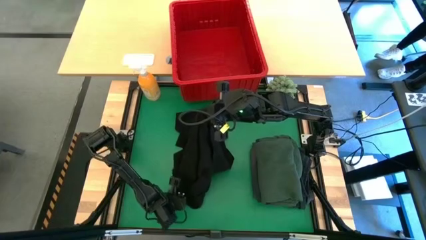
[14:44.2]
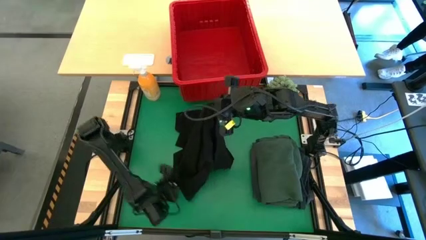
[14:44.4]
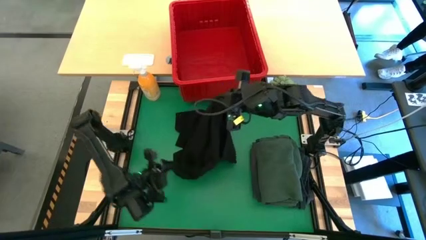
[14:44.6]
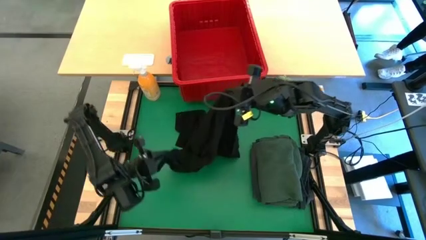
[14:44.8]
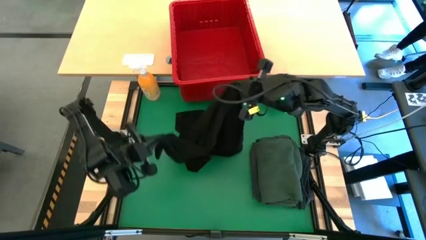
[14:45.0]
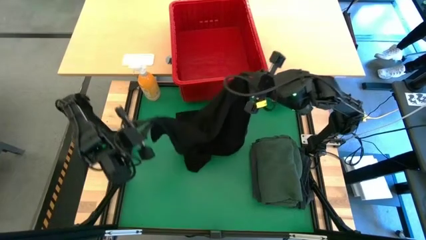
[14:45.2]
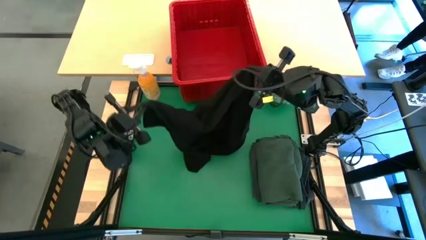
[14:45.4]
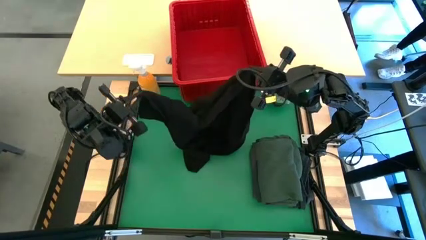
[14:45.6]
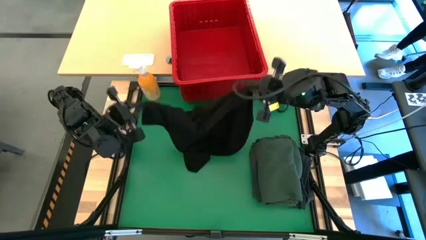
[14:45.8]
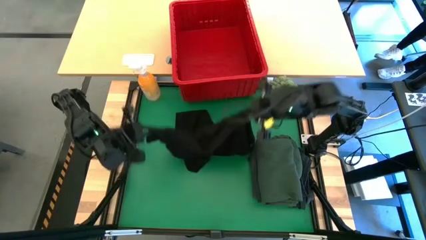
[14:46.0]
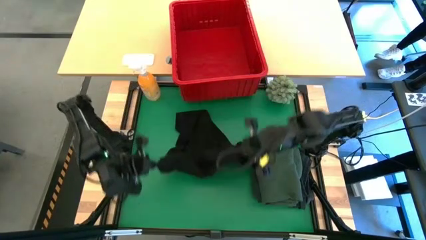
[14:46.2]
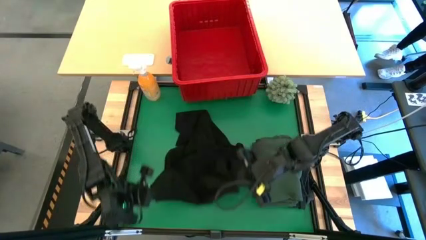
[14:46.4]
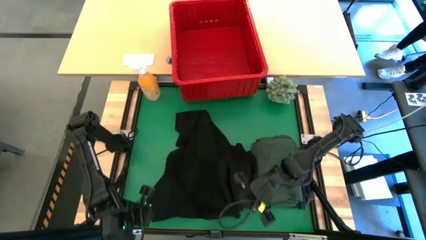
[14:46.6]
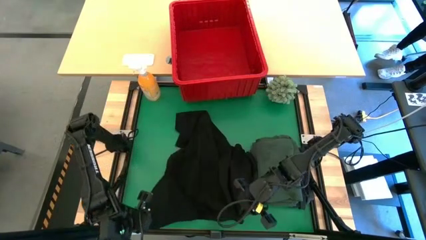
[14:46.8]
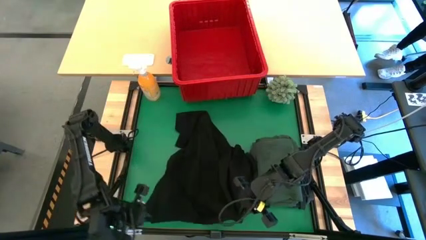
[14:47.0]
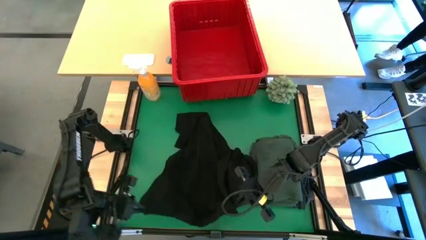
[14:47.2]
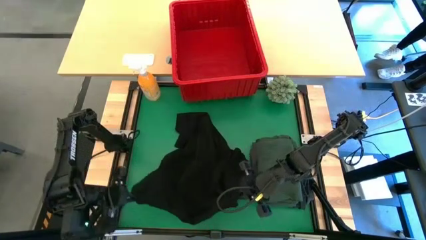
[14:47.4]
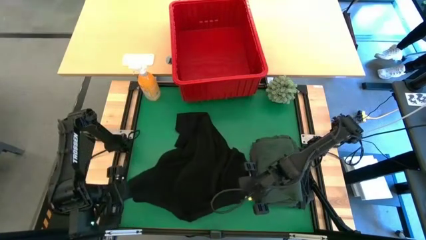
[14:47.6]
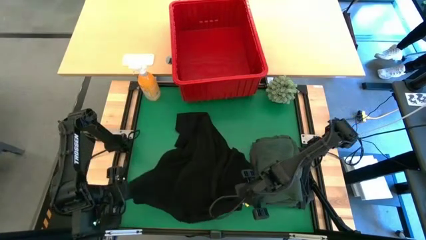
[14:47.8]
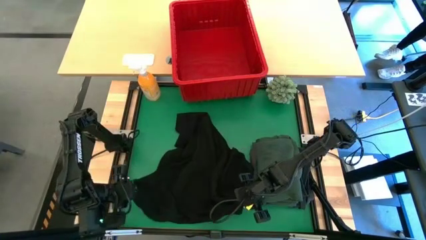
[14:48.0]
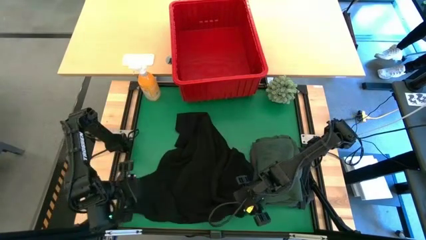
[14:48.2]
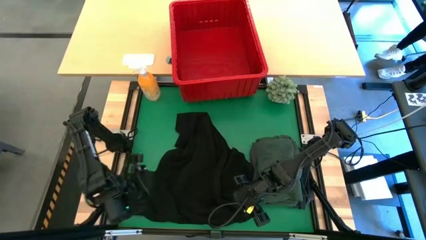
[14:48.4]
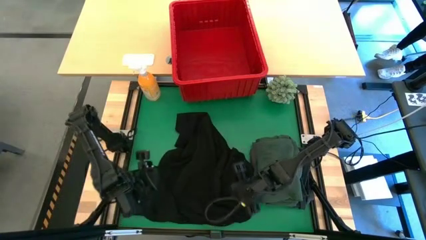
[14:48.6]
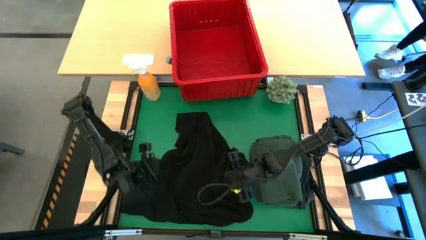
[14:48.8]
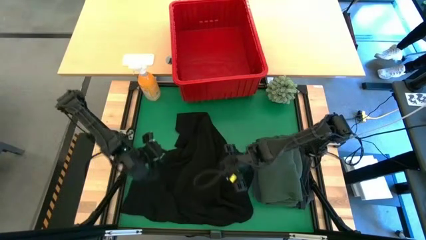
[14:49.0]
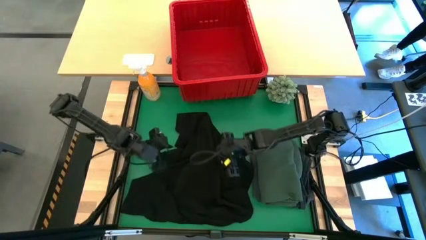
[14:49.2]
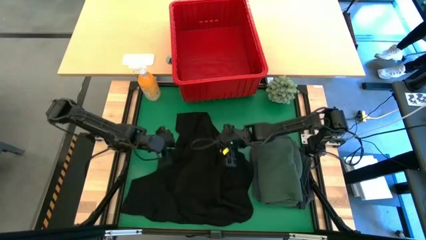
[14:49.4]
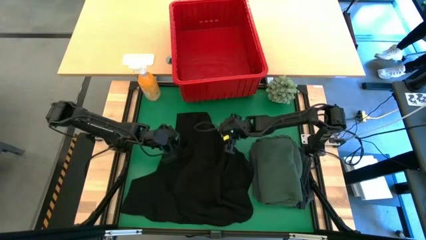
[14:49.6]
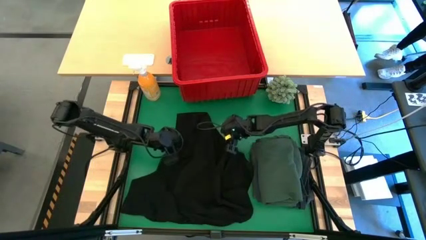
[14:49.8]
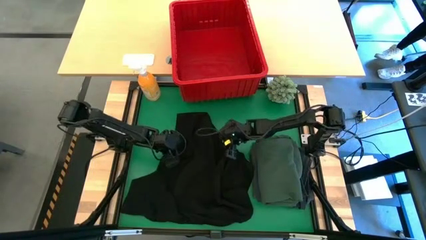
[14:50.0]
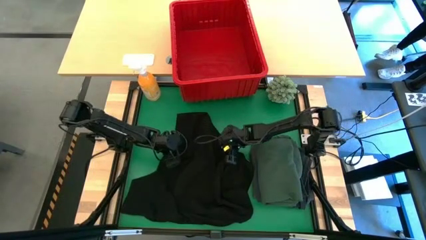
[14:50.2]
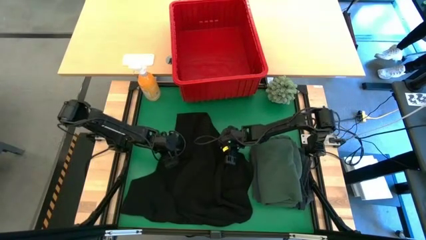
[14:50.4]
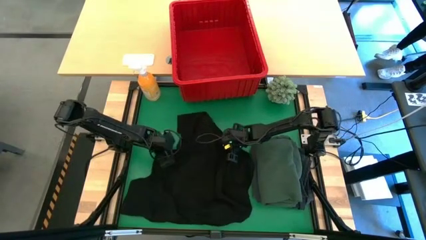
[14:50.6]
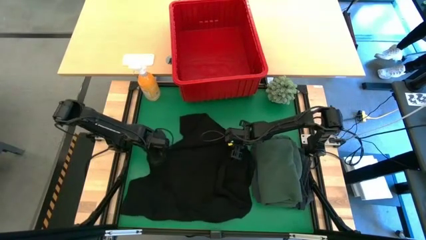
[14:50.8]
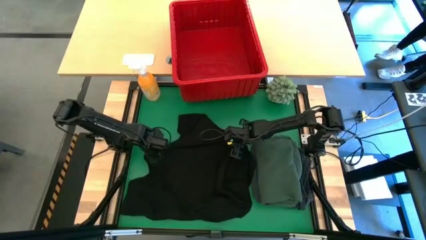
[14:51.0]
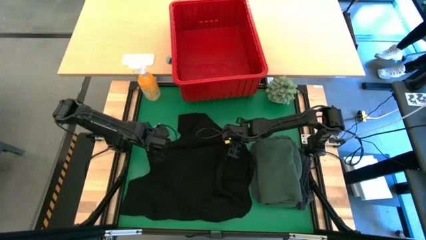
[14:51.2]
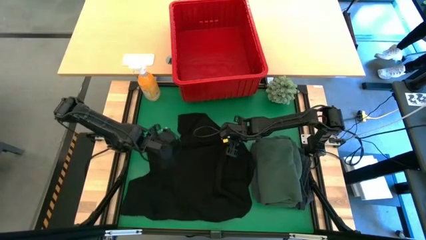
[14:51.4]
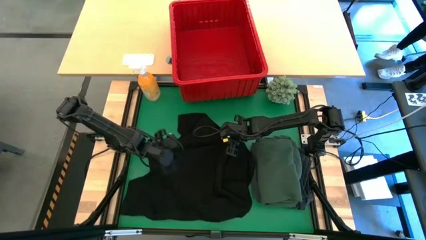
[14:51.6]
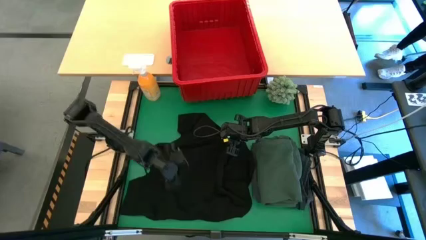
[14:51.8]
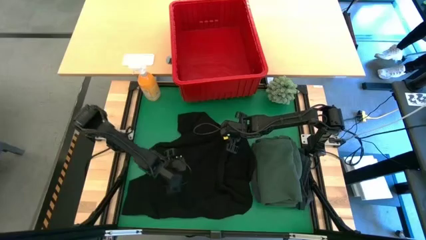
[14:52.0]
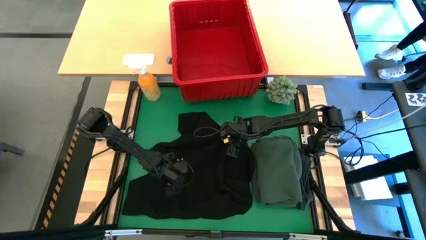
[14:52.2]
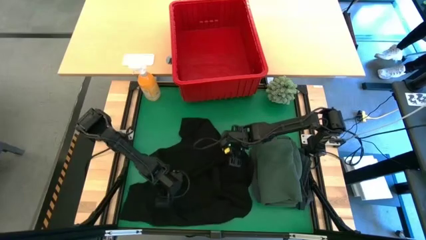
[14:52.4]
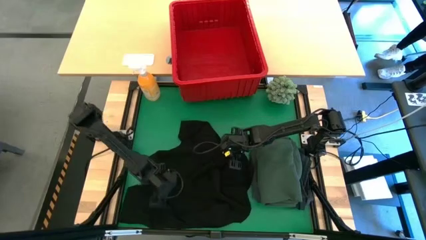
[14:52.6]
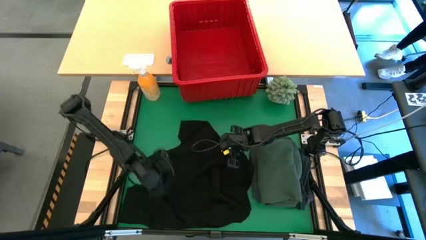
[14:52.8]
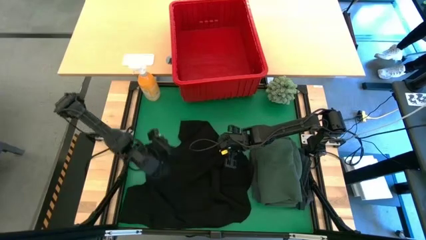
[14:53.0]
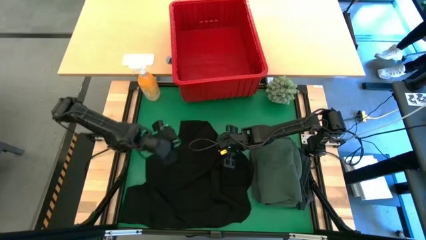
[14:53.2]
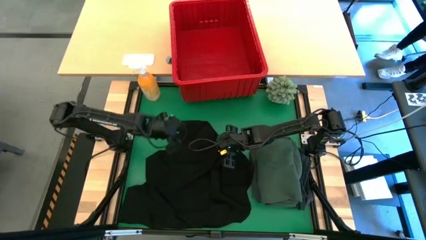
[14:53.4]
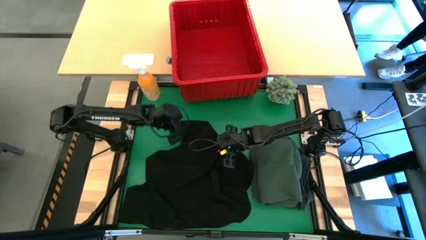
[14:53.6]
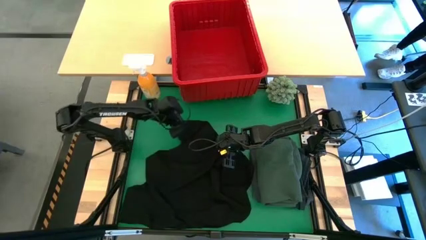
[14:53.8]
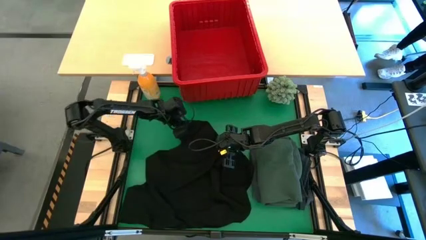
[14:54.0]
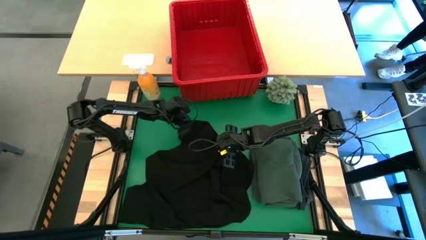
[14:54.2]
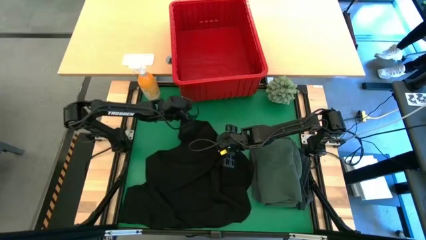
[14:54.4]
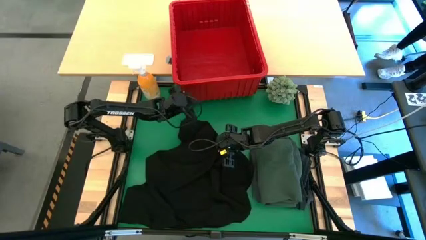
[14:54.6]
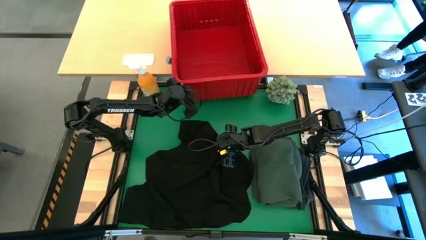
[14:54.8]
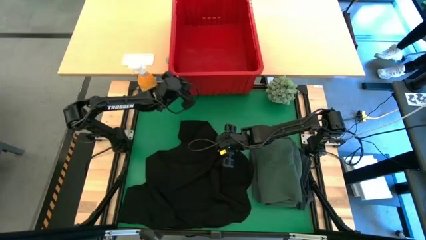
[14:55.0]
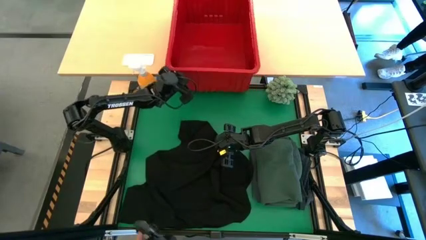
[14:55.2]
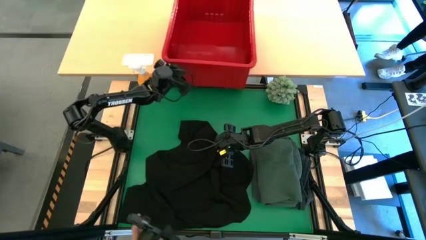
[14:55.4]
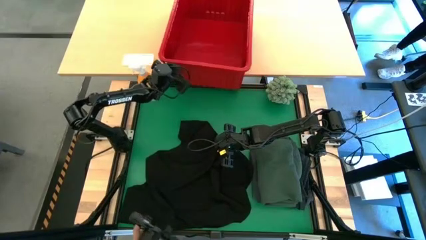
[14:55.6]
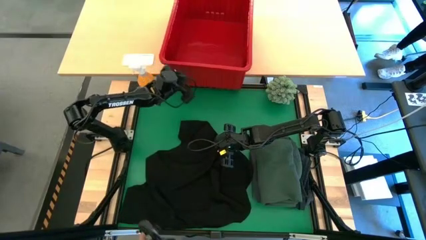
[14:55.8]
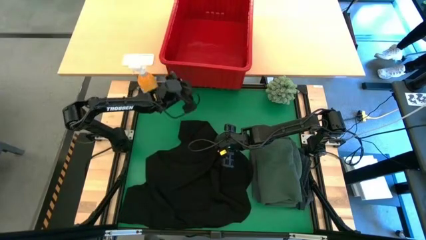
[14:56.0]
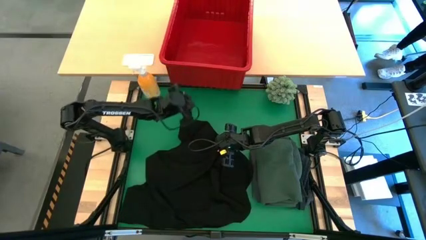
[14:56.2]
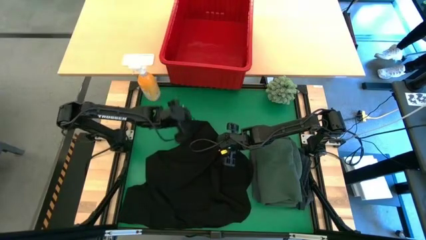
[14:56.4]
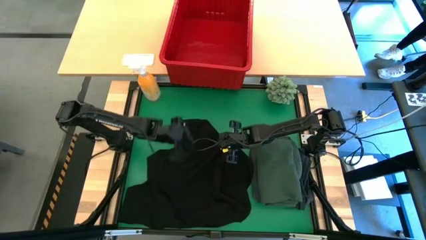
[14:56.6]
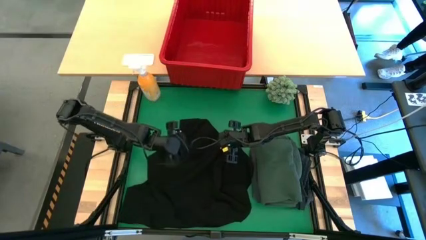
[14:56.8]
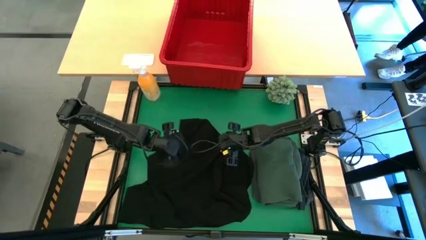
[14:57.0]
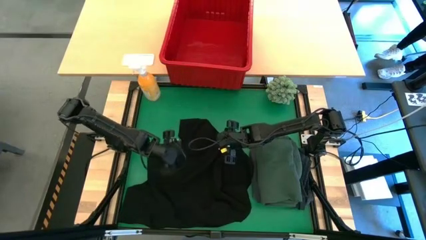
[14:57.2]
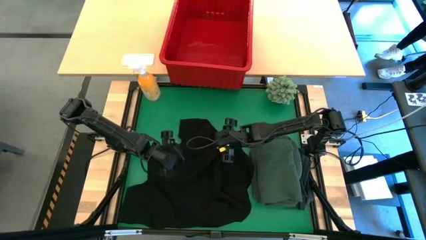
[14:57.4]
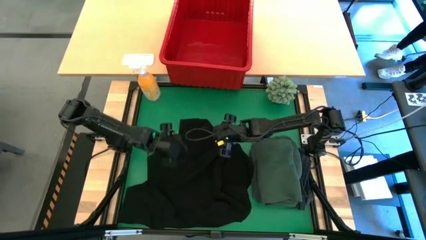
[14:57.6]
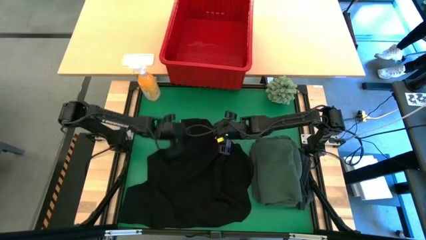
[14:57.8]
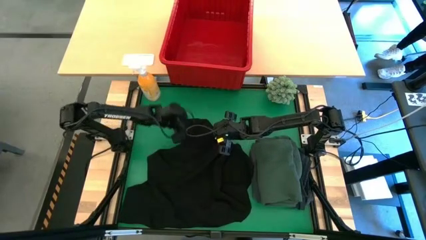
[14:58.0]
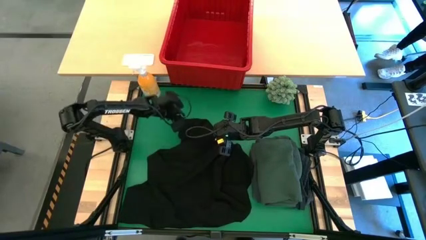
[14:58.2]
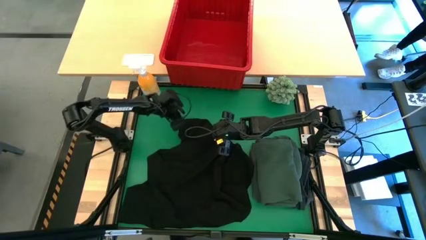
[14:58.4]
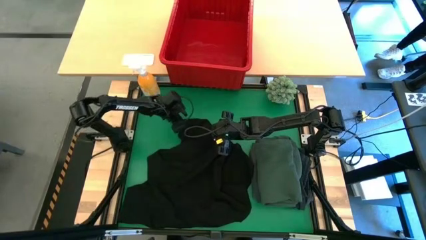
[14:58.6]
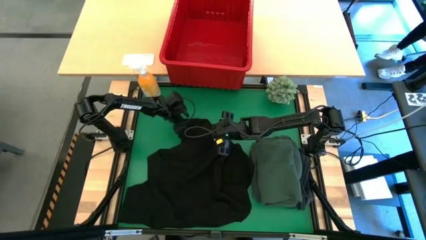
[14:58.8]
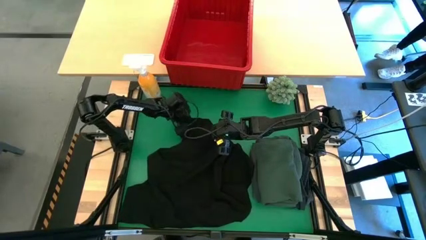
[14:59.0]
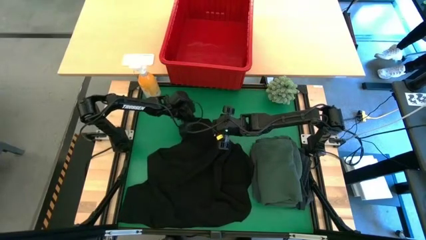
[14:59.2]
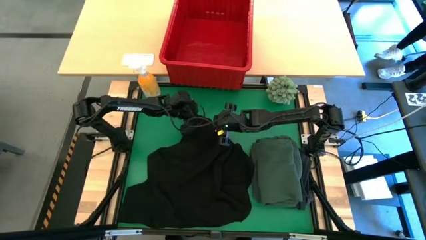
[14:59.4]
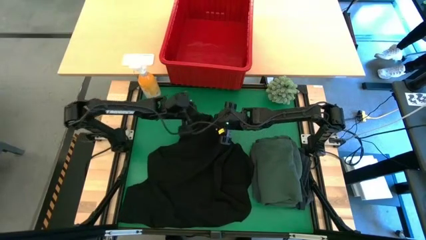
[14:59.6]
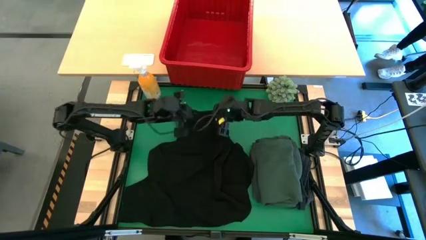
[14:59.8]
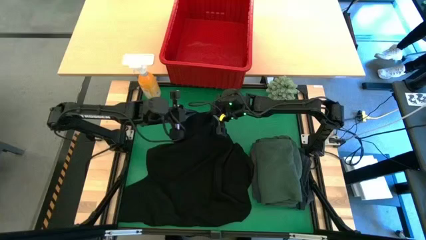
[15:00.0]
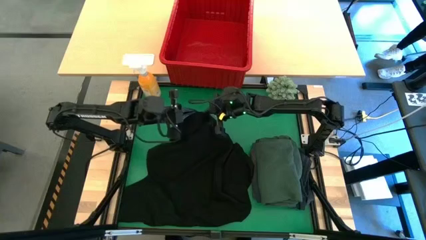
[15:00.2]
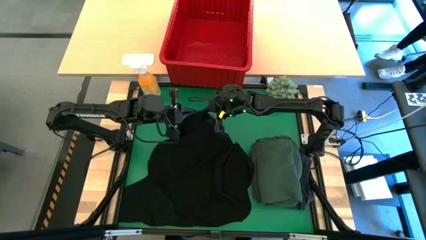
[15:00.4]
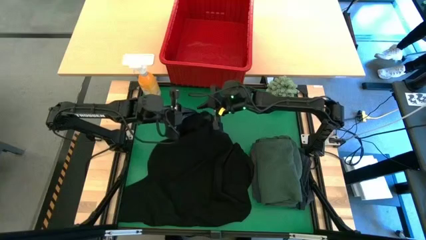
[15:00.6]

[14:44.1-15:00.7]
Task: Fold Laundry from Bin
Fold the black shirt
